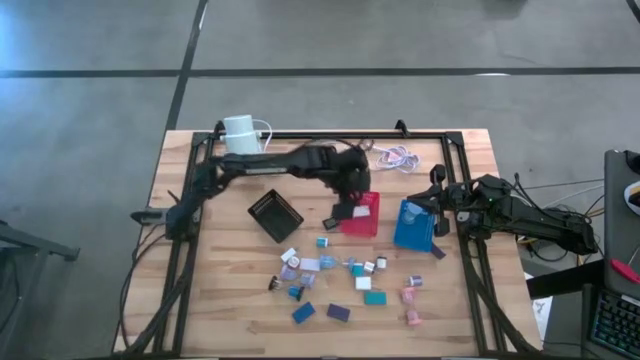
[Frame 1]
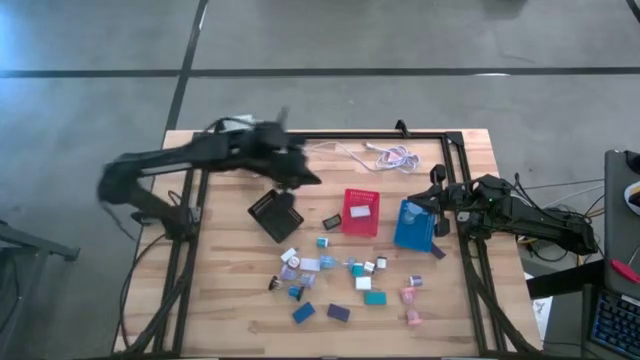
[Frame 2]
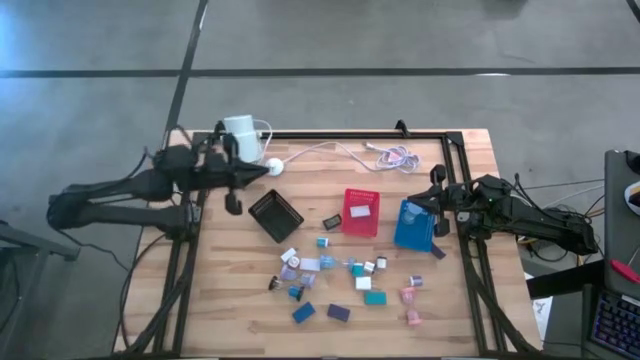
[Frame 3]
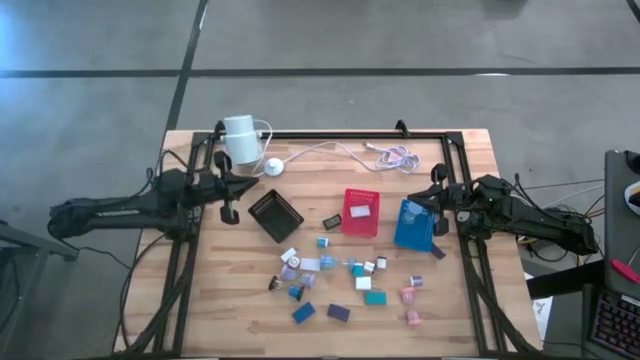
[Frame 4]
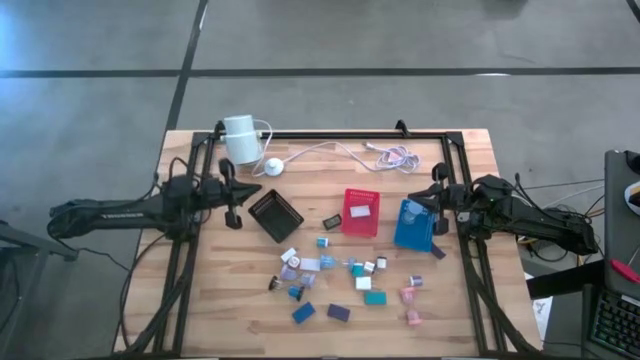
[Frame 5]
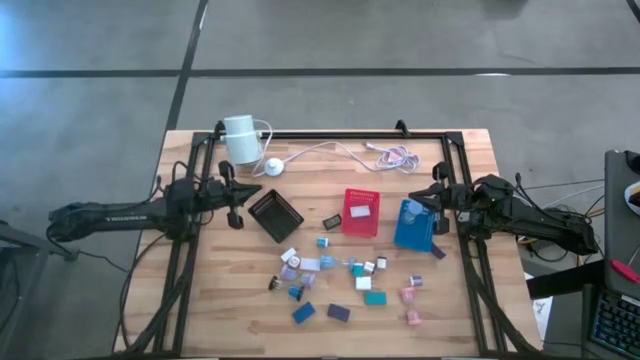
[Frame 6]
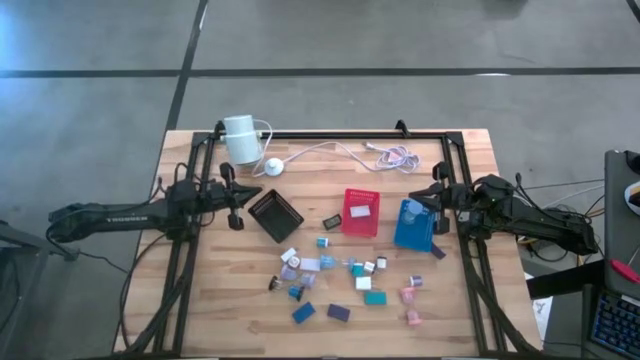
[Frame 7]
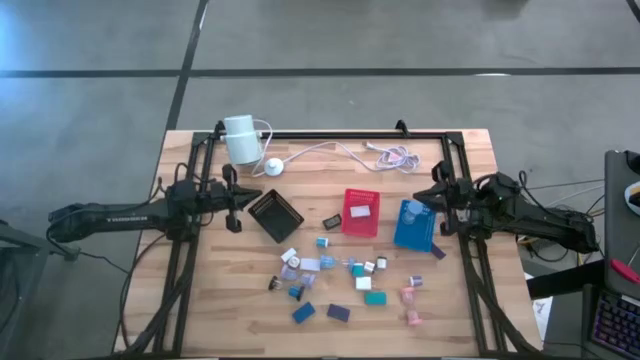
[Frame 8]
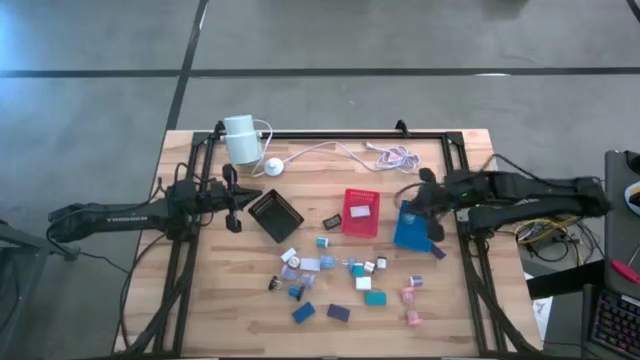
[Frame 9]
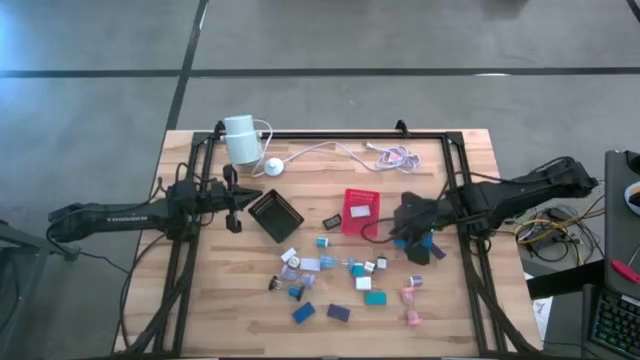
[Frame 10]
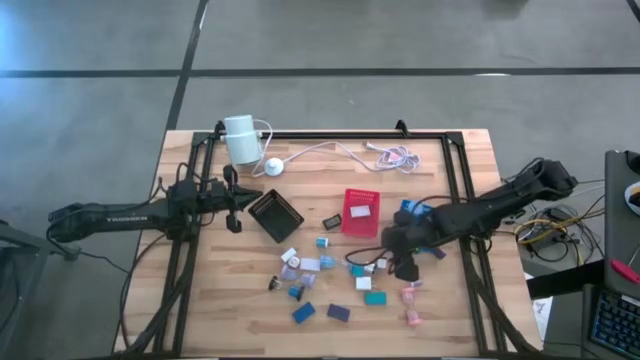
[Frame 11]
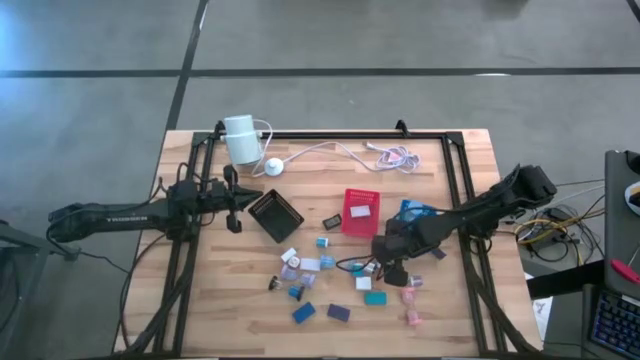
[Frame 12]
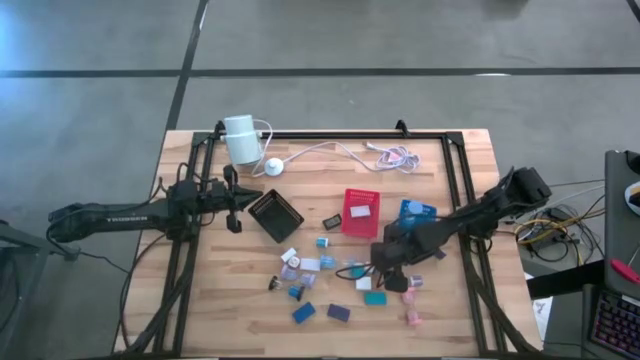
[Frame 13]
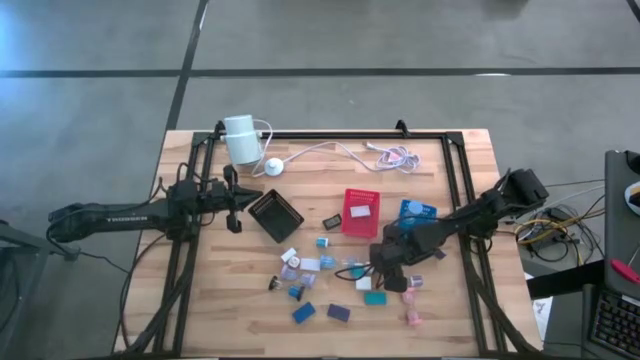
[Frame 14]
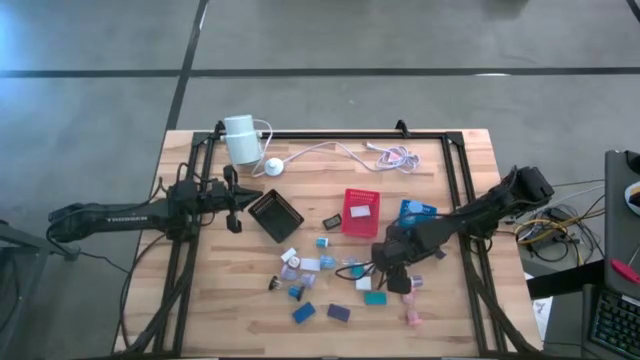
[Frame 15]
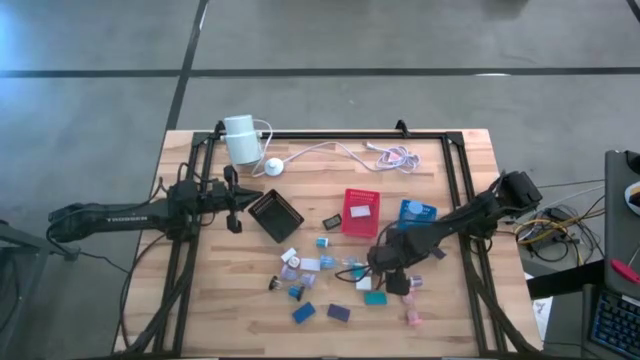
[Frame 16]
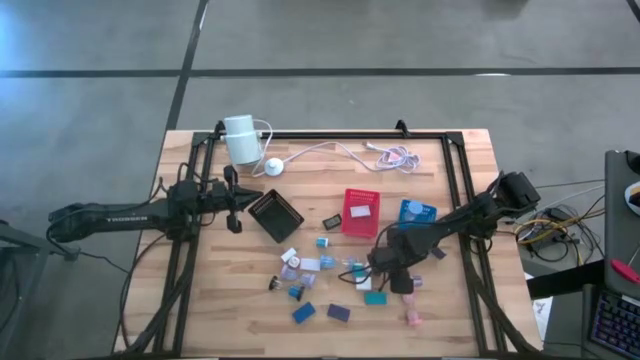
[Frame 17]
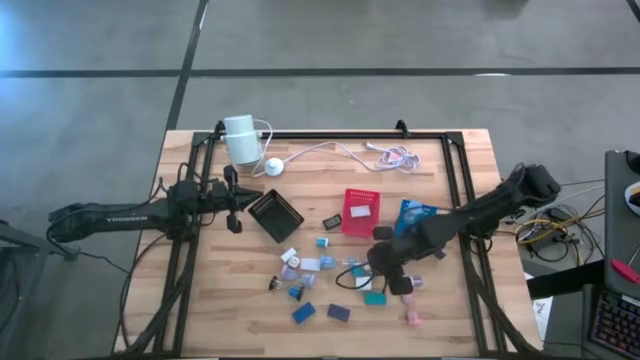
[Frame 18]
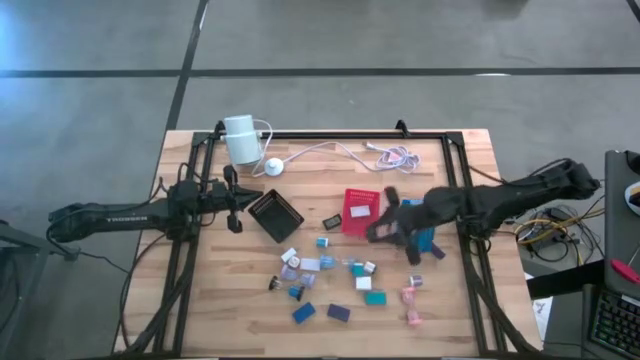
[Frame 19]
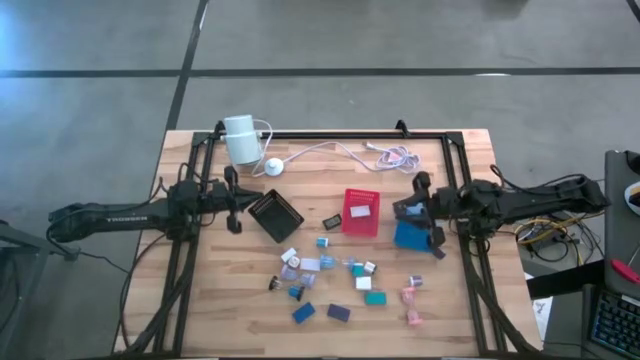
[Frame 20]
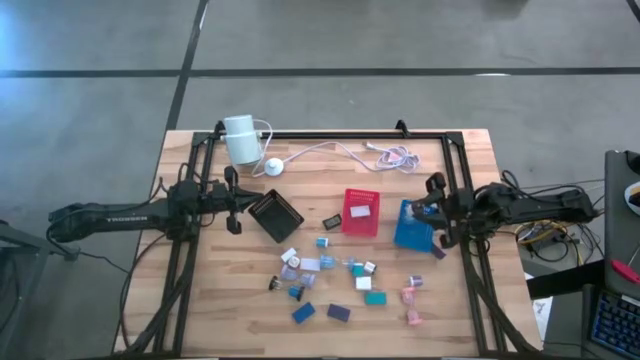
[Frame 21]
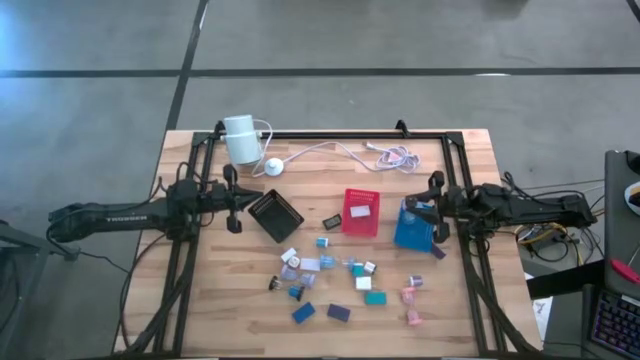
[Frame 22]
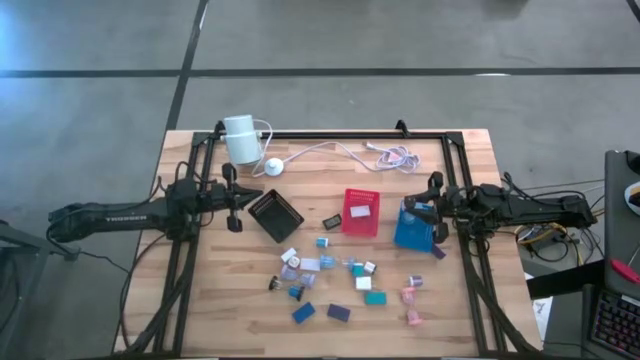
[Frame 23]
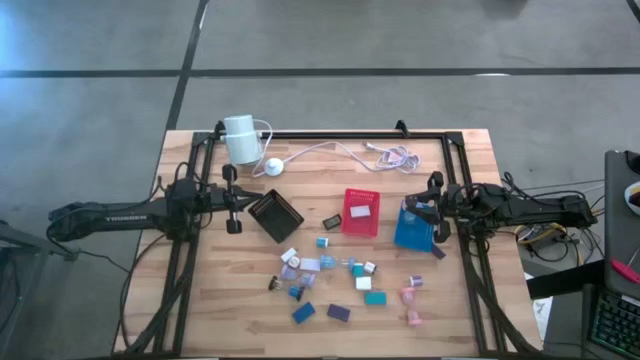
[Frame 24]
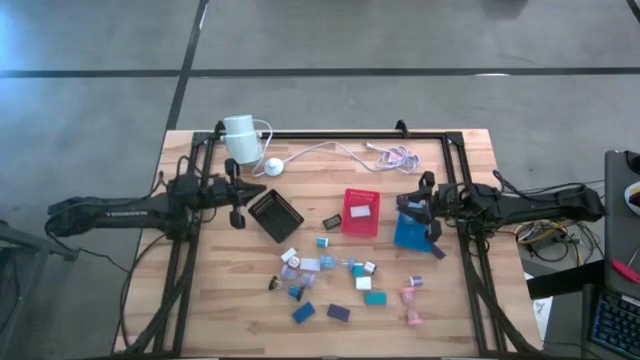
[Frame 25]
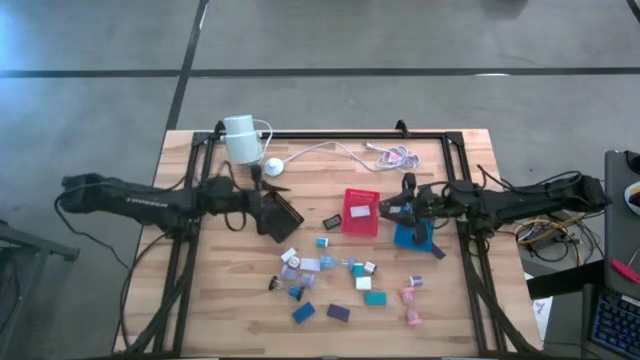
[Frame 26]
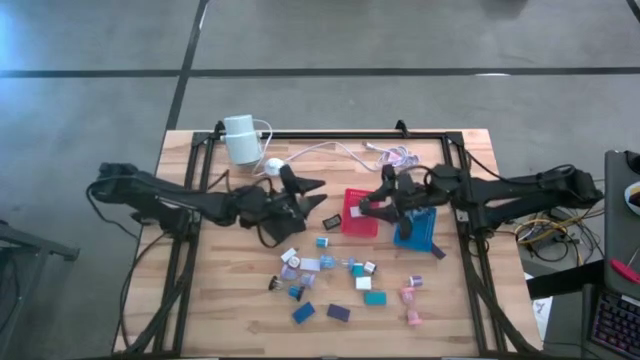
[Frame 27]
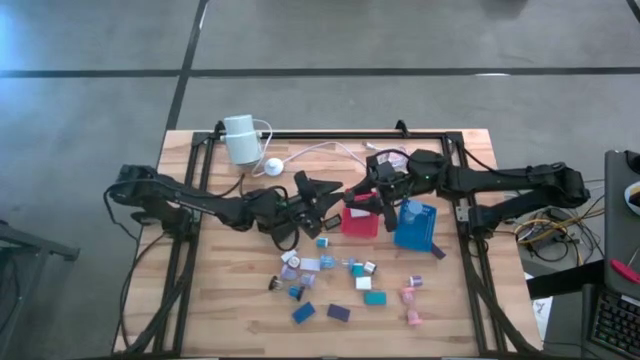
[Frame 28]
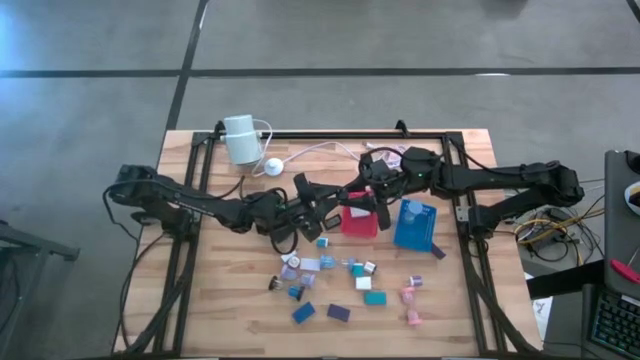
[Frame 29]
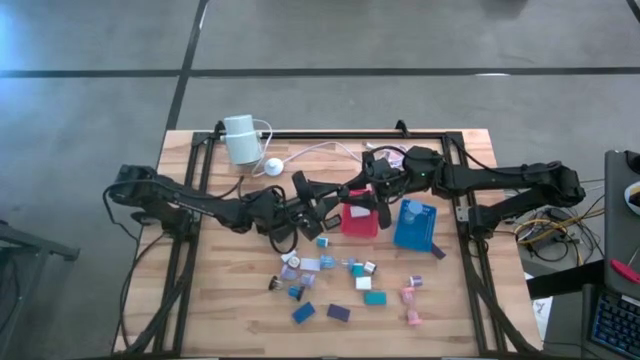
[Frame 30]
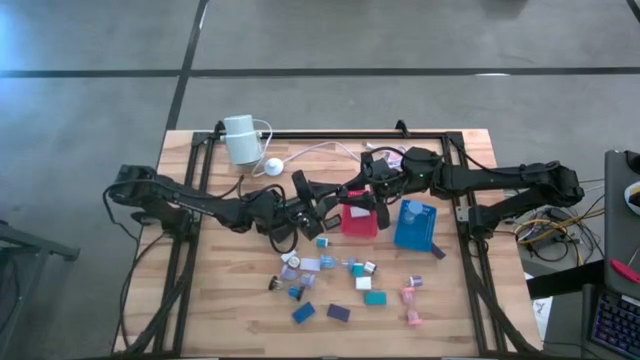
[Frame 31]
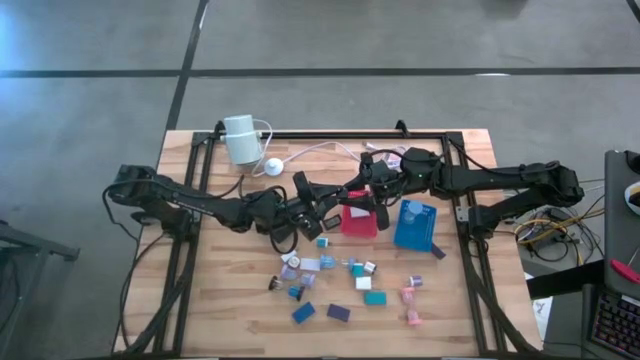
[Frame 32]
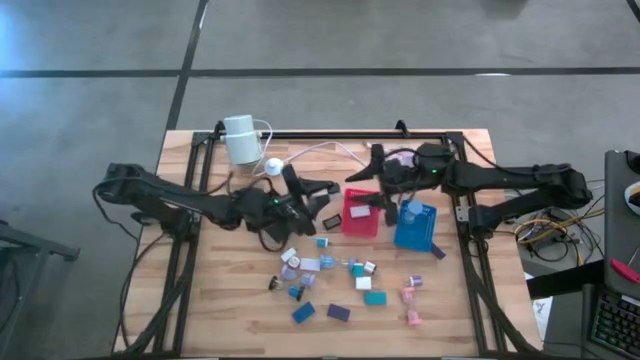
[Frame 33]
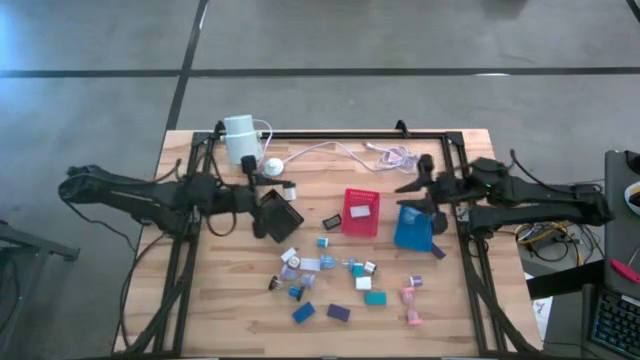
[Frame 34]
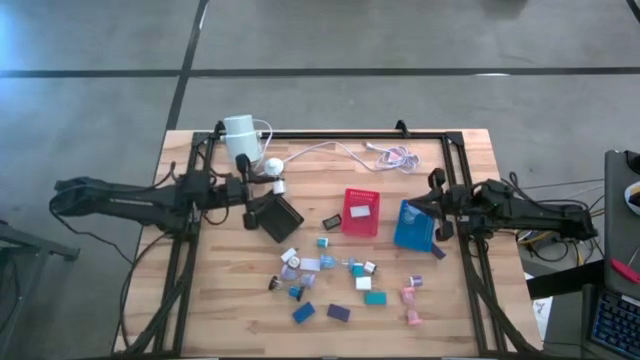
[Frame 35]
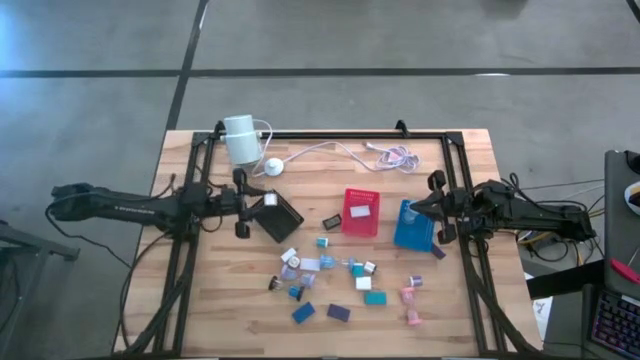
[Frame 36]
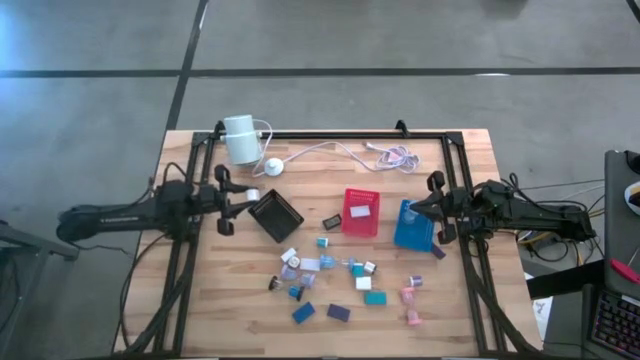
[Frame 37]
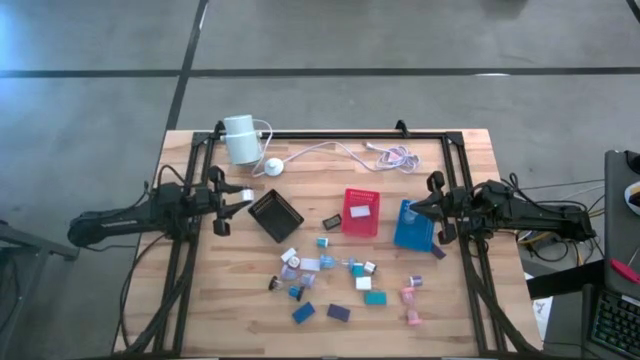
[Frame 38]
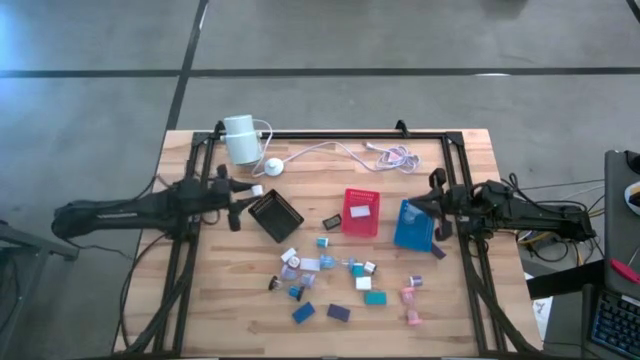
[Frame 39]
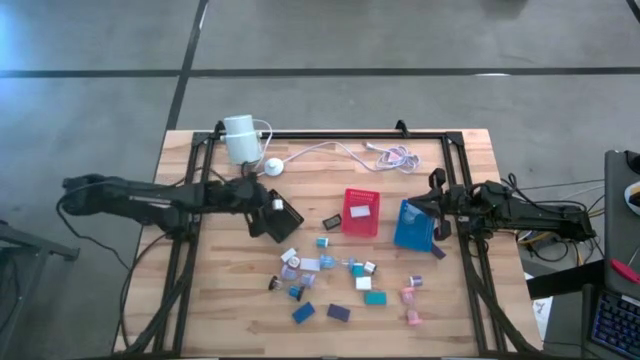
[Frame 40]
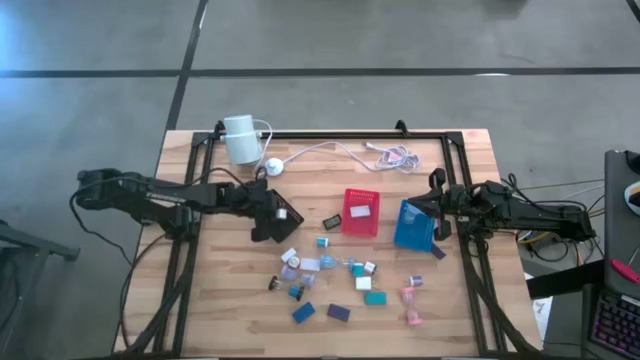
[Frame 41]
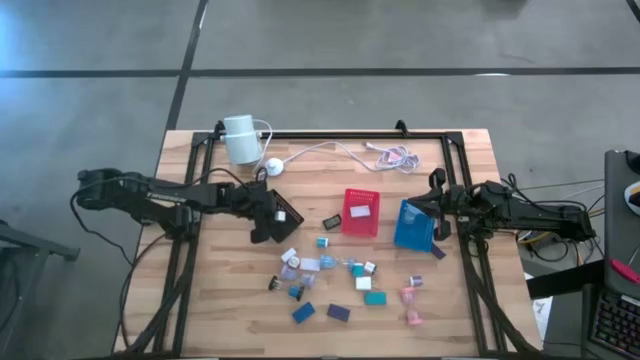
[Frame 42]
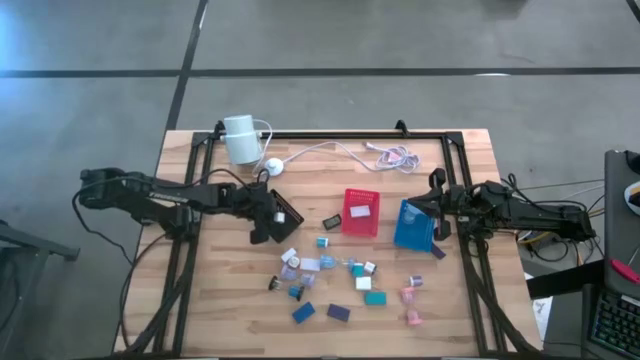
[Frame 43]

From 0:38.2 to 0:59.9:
Task: Pick & Place Office items
Put the right black and white charger adapter into the black bin
